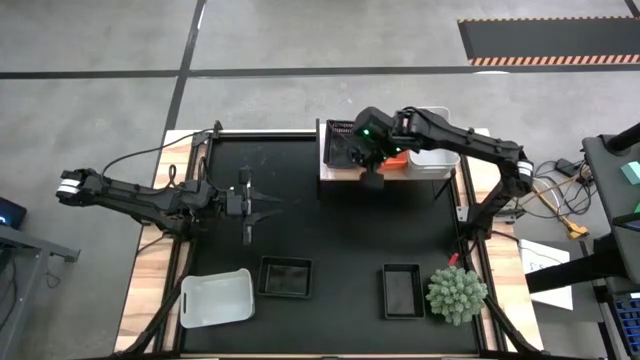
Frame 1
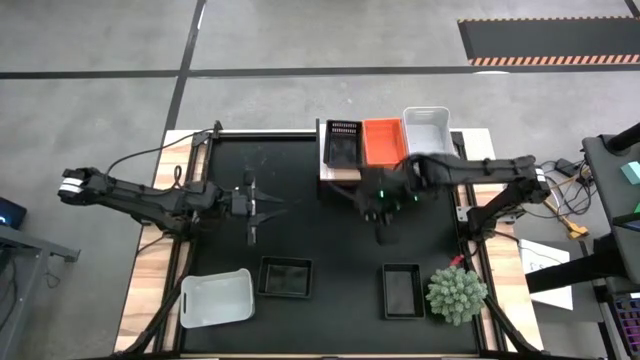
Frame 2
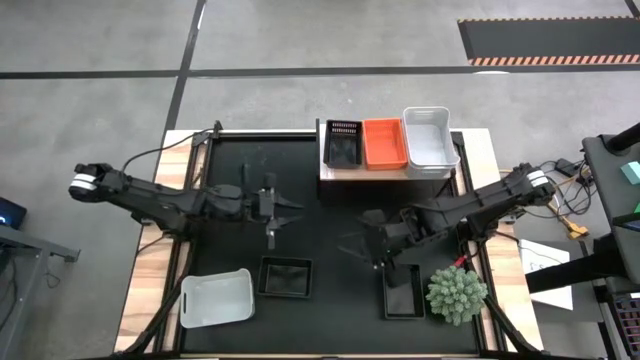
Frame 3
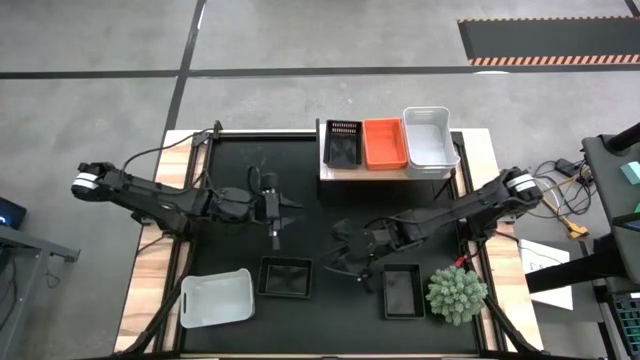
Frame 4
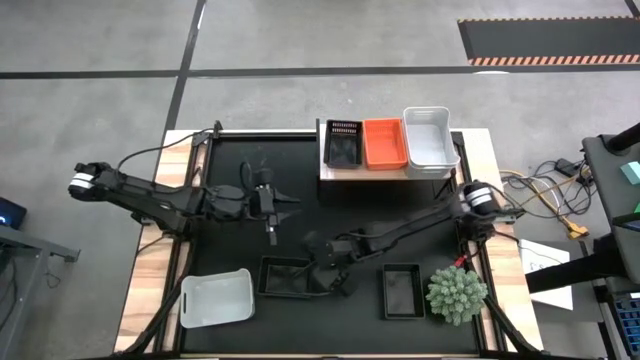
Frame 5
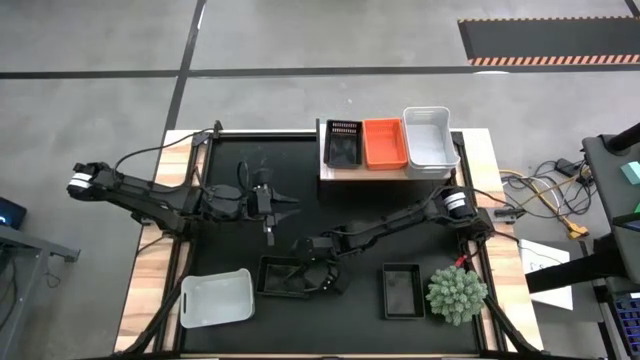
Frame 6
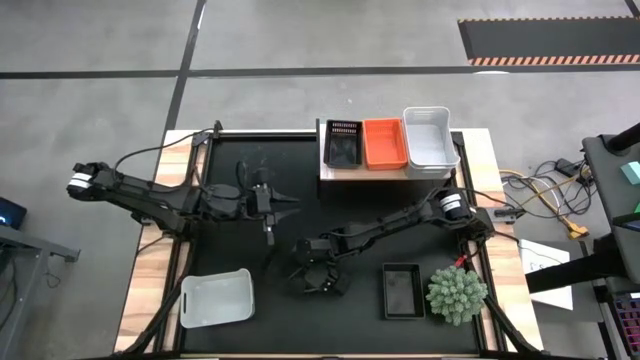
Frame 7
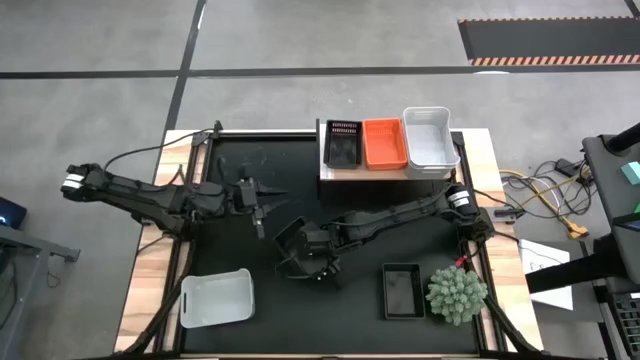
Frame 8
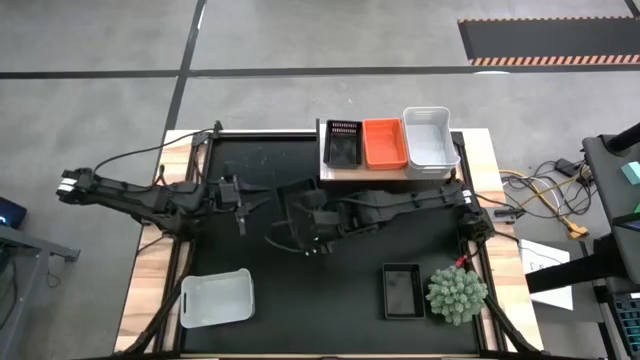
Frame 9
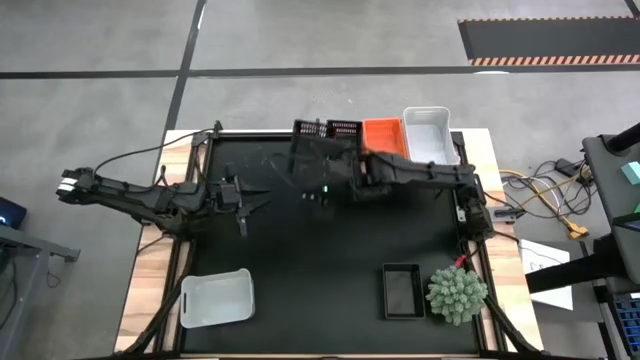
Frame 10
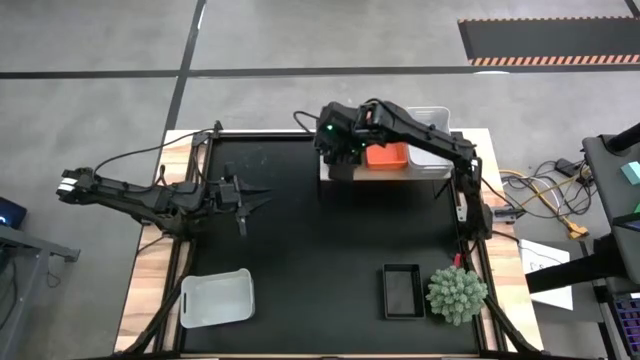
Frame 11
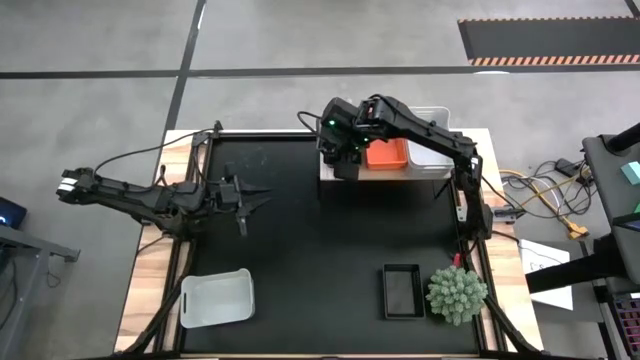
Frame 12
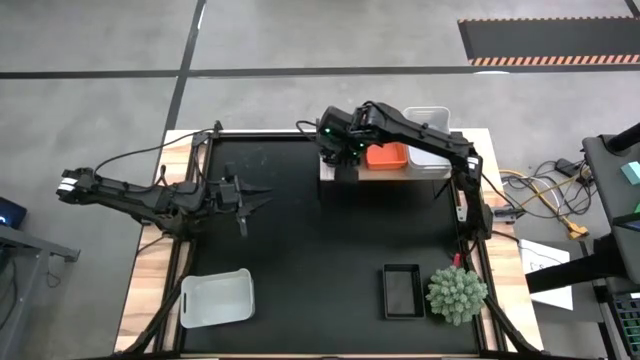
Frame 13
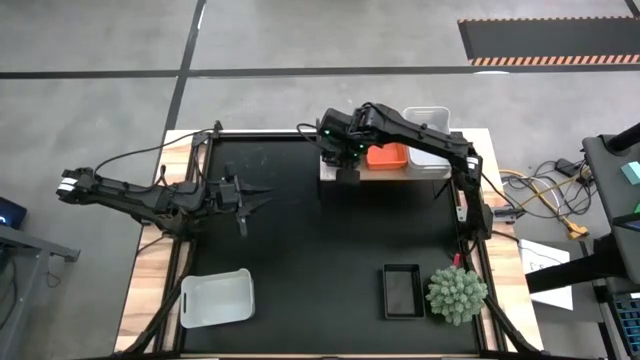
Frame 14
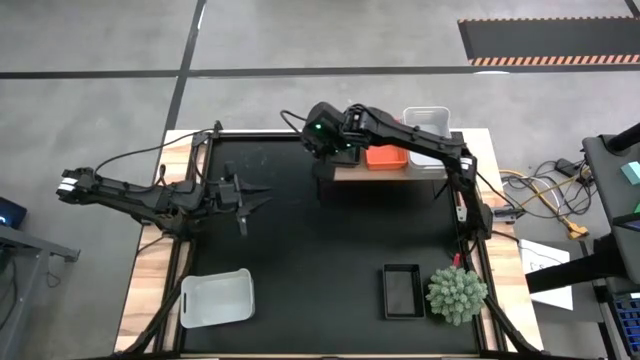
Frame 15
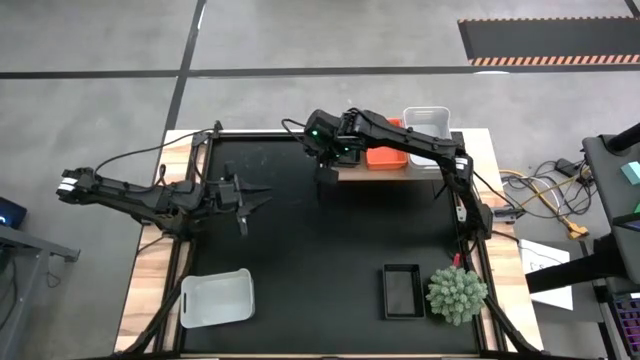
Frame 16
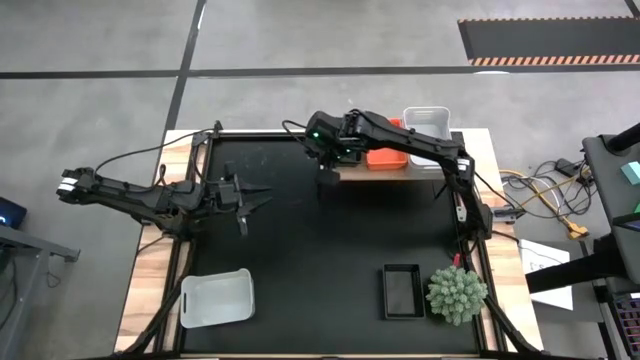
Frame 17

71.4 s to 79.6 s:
Stack the left black basket on the black basket on the shelf

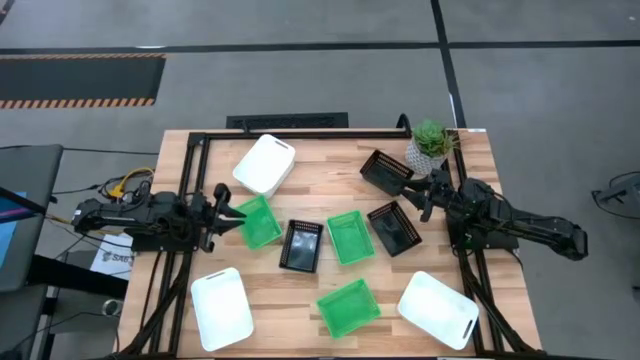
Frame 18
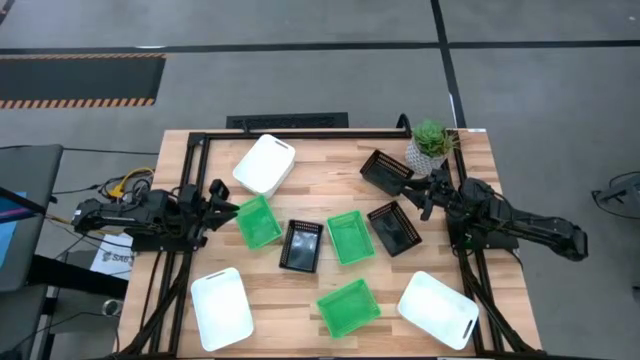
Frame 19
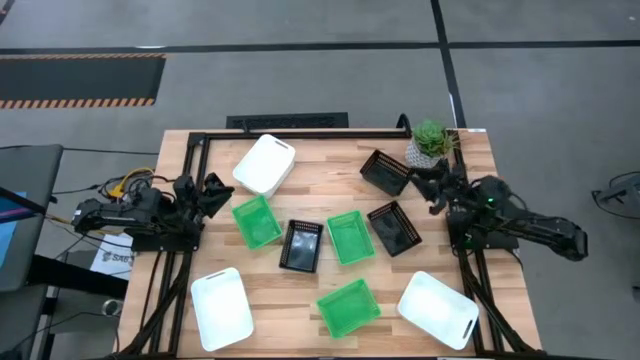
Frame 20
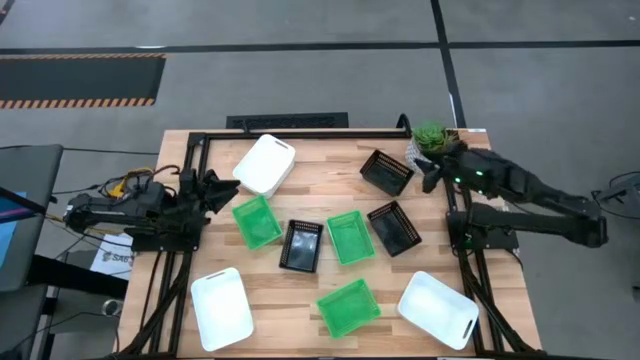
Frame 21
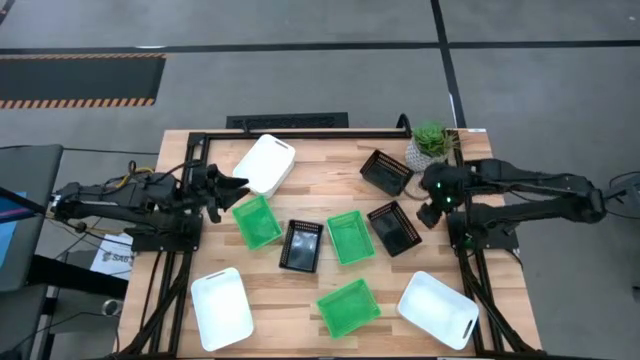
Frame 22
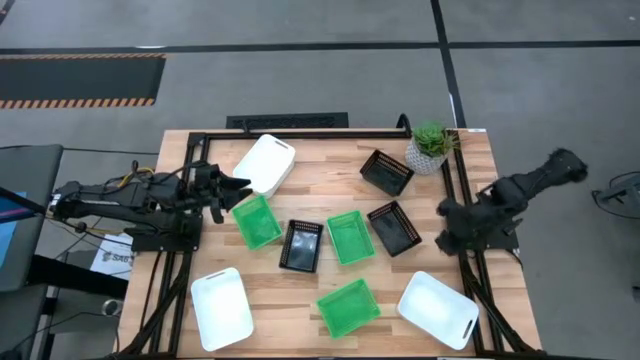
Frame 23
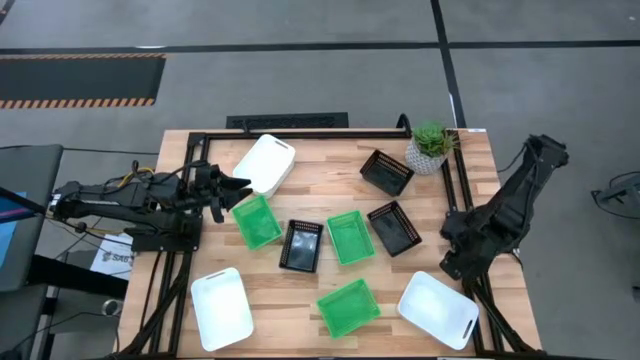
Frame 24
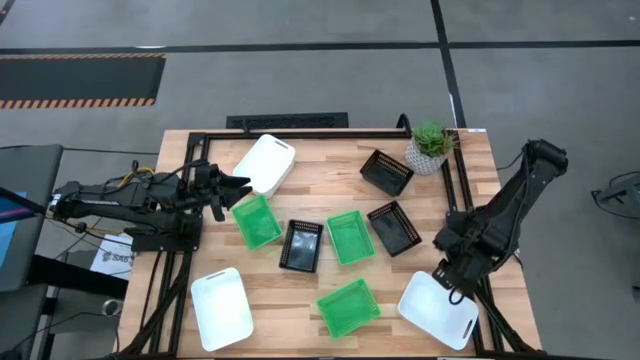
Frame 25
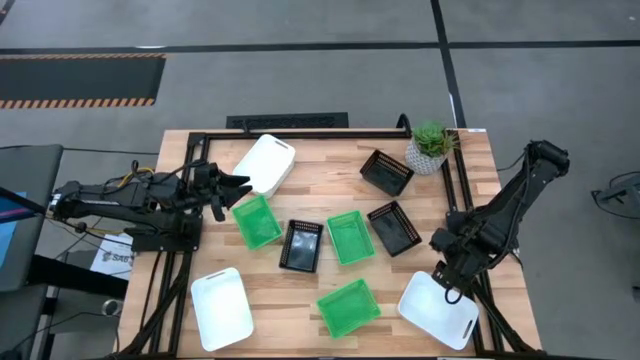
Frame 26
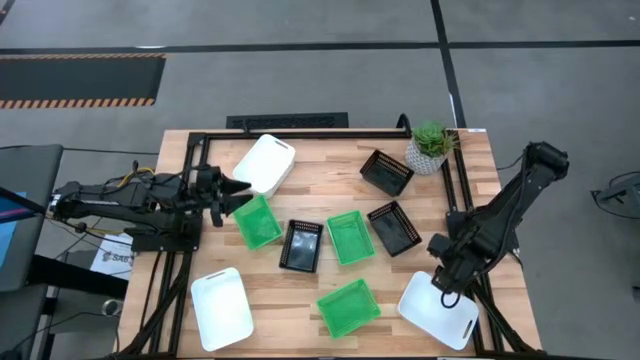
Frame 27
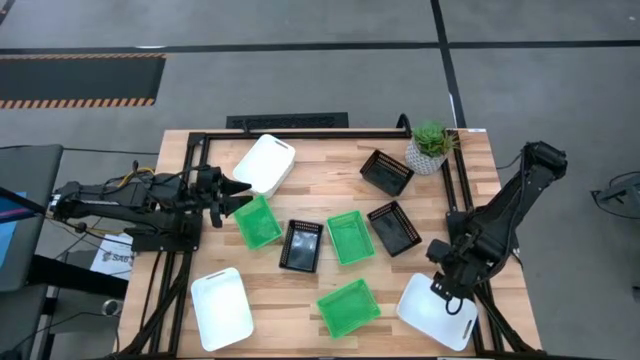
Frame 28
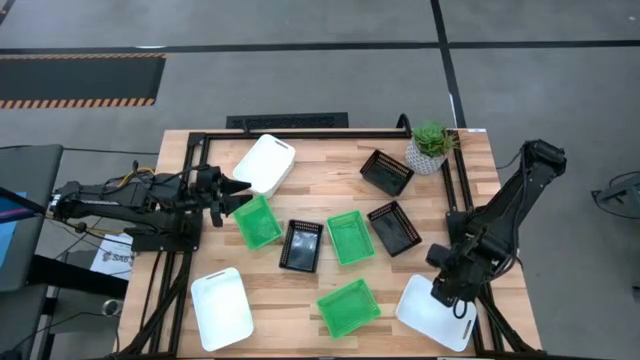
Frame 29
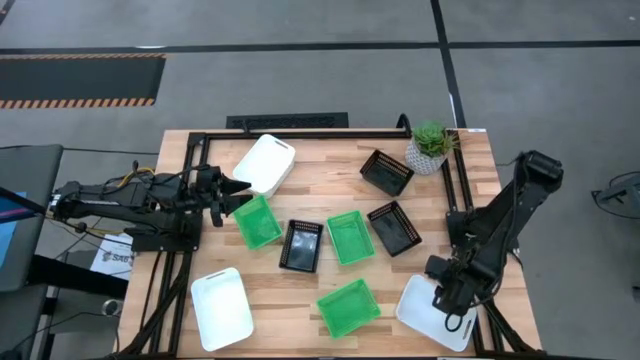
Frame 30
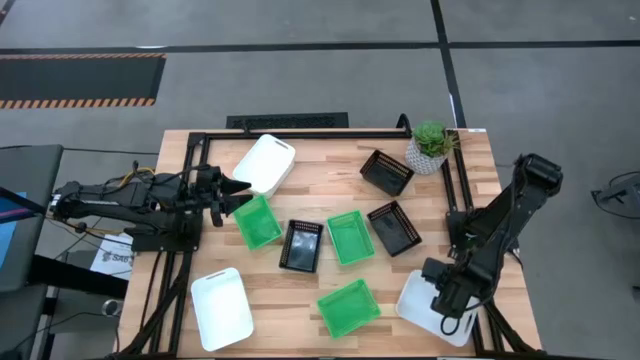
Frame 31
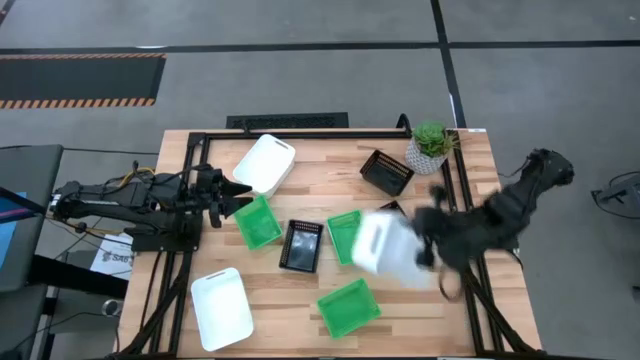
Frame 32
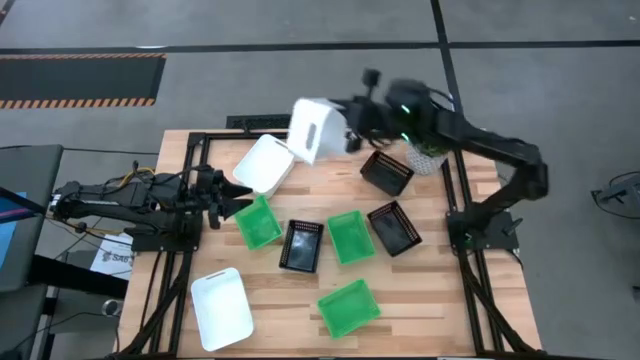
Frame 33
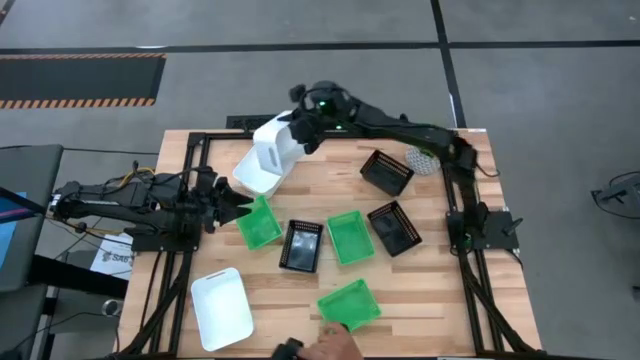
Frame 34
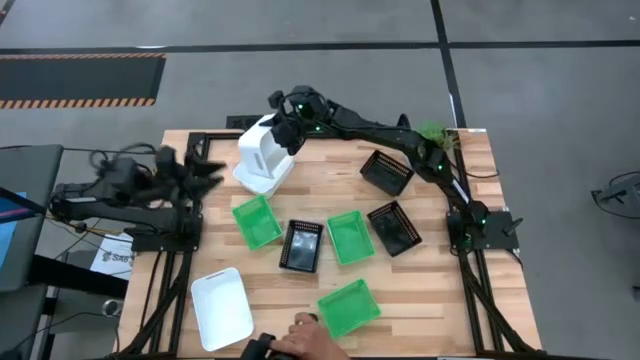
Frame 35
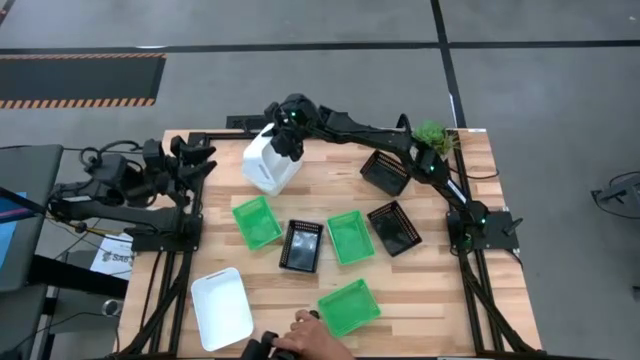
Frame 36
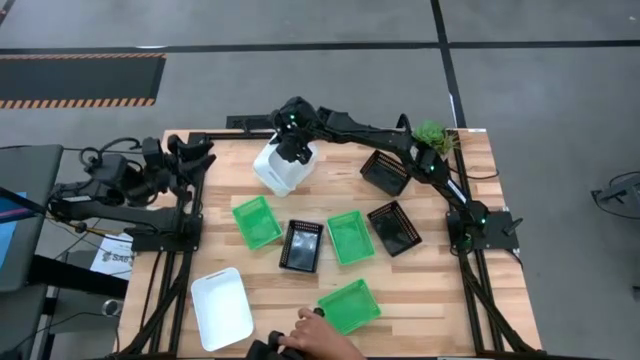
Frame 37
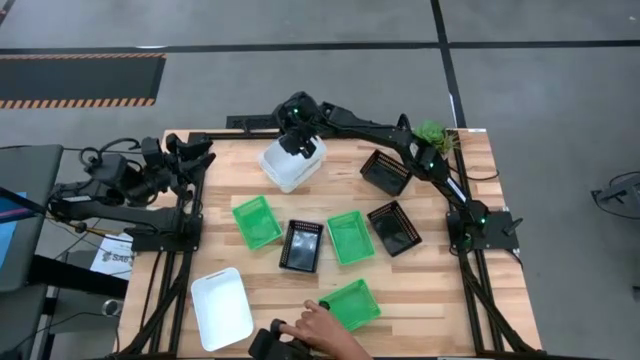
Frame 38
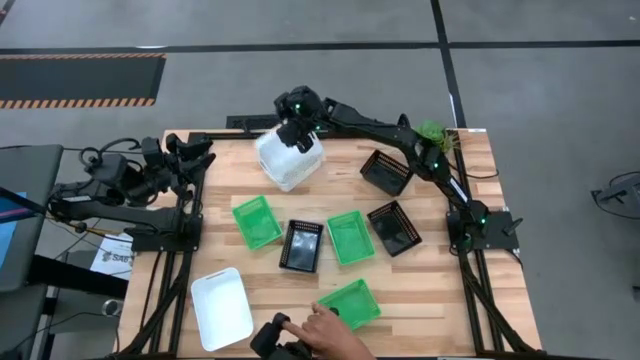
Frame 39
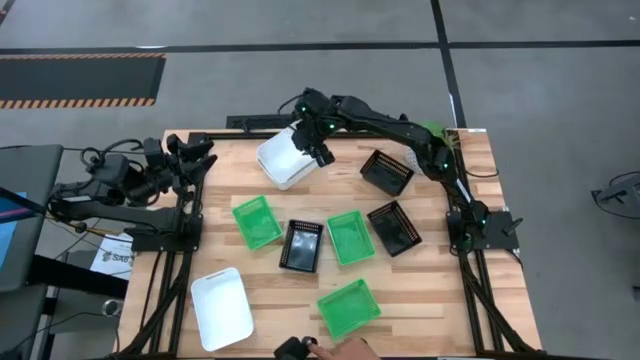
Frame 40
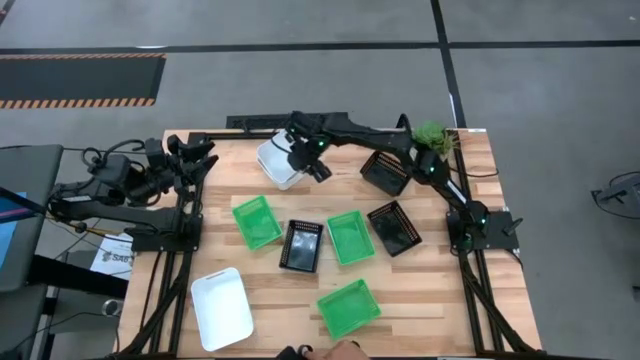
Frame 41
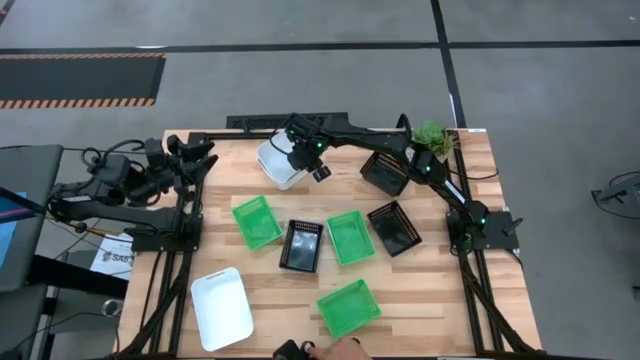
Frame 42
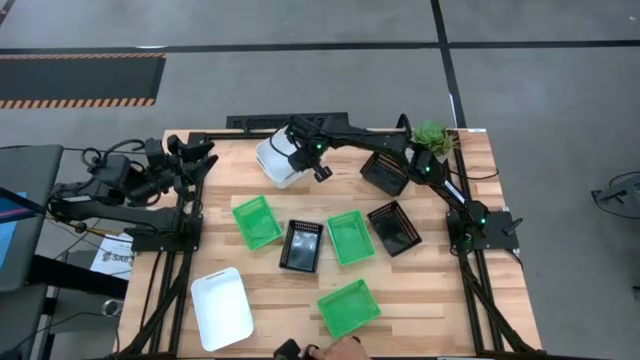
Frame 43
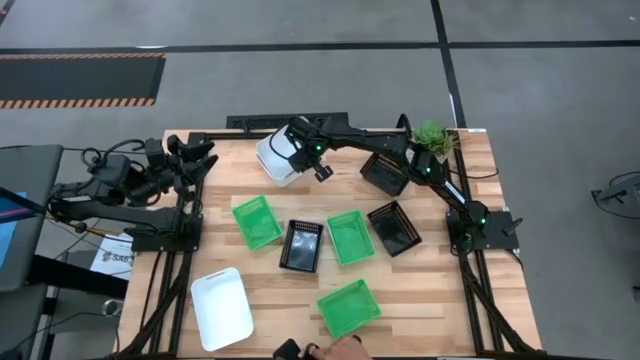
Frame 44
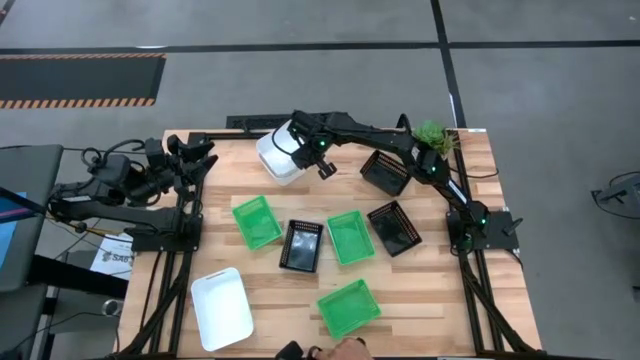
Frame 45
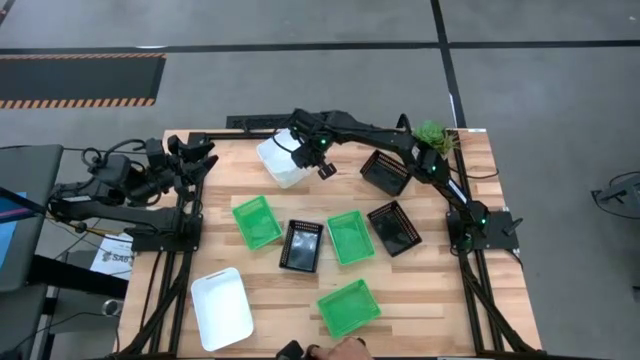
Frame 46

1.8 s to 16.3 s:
Stack the bottom right white bin on the top white bin
